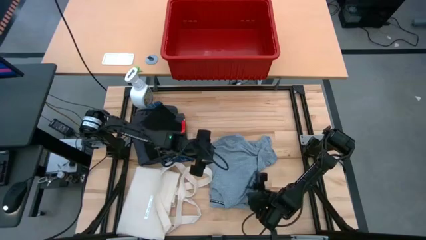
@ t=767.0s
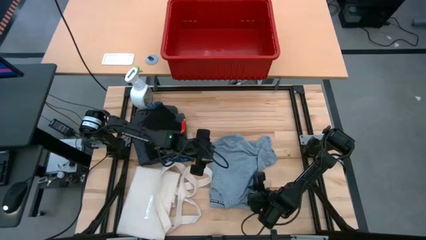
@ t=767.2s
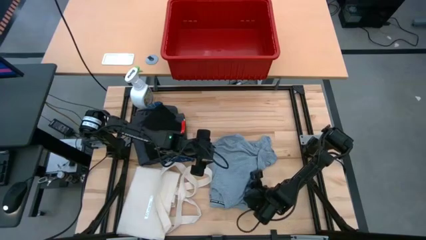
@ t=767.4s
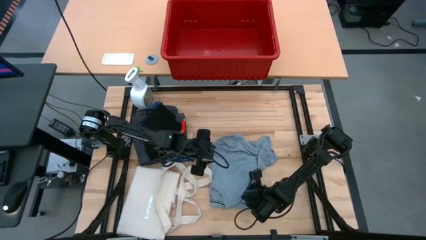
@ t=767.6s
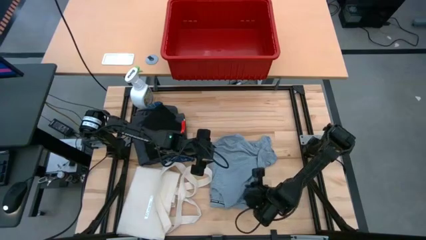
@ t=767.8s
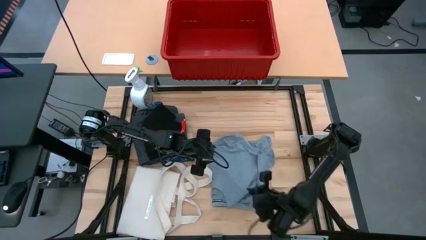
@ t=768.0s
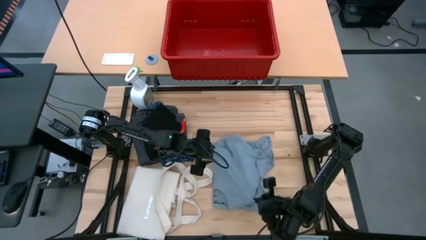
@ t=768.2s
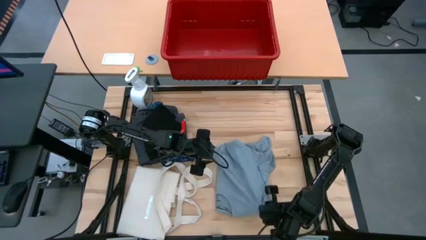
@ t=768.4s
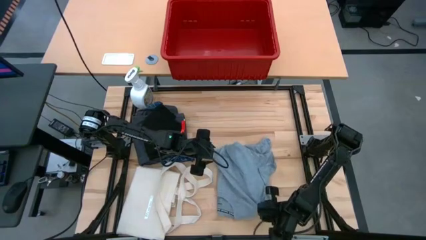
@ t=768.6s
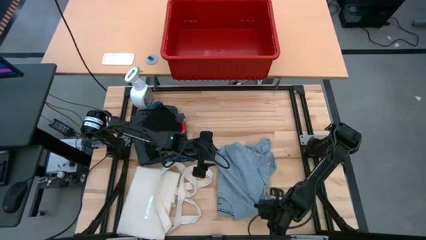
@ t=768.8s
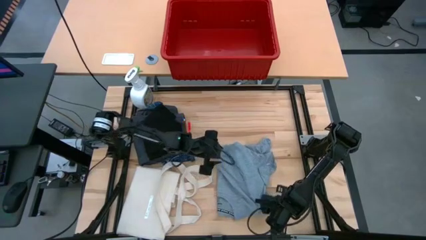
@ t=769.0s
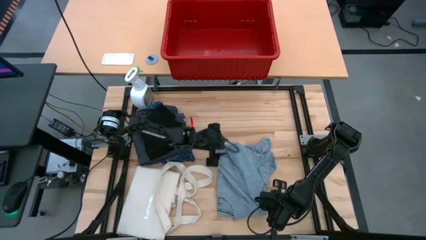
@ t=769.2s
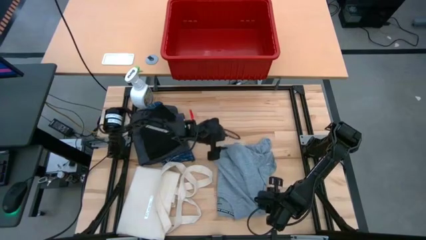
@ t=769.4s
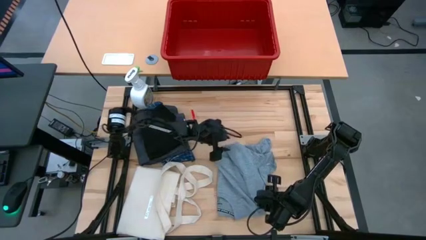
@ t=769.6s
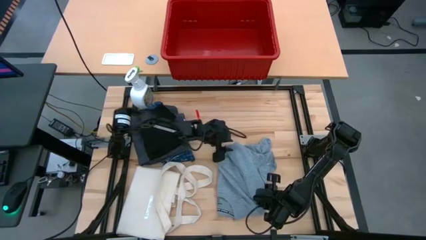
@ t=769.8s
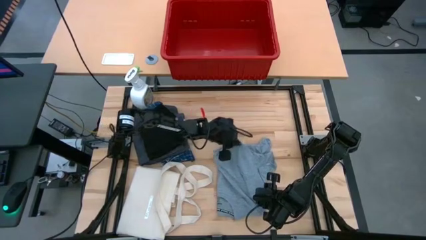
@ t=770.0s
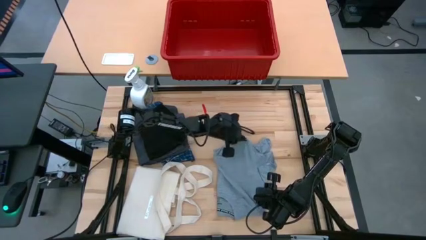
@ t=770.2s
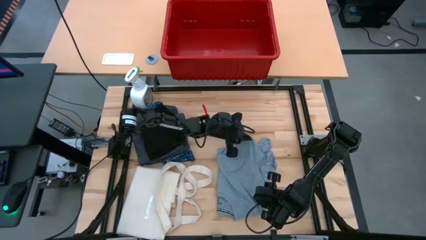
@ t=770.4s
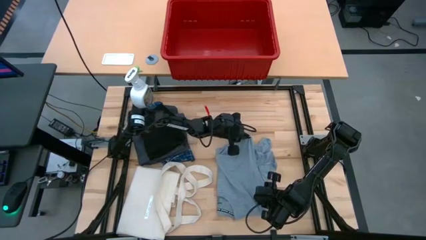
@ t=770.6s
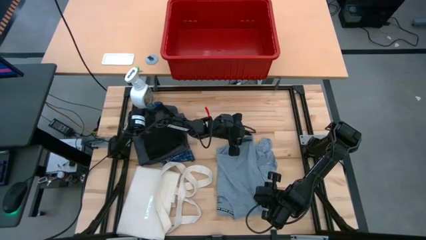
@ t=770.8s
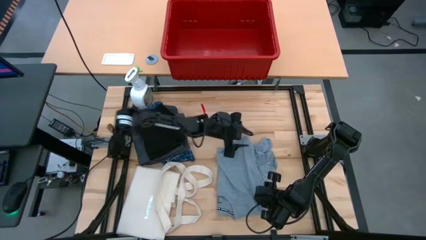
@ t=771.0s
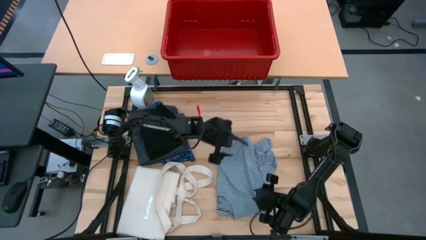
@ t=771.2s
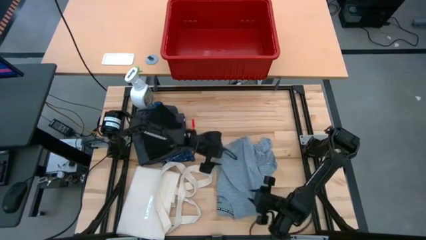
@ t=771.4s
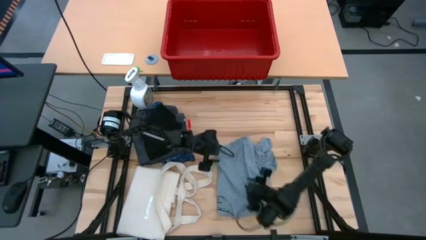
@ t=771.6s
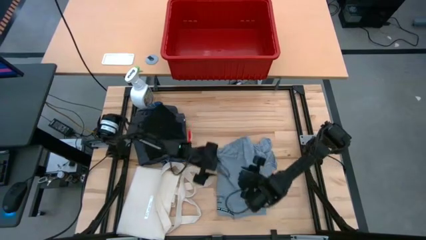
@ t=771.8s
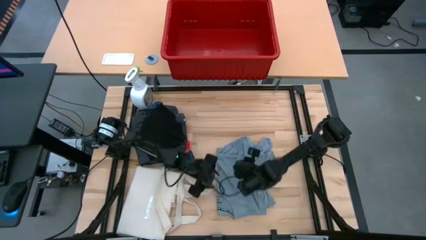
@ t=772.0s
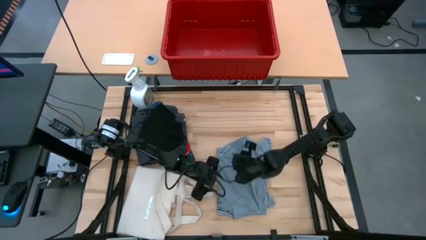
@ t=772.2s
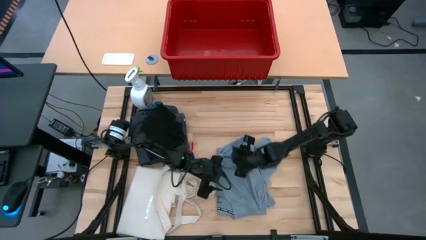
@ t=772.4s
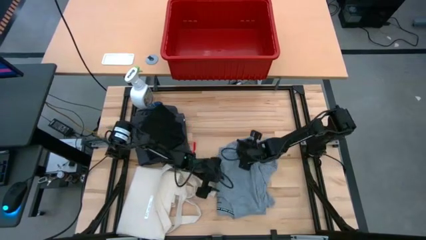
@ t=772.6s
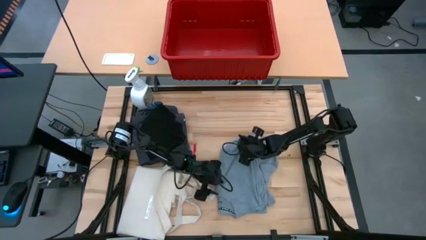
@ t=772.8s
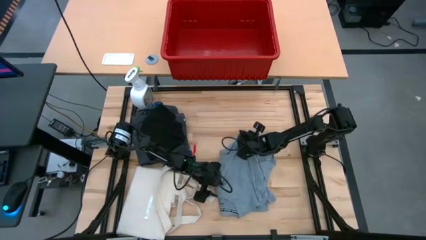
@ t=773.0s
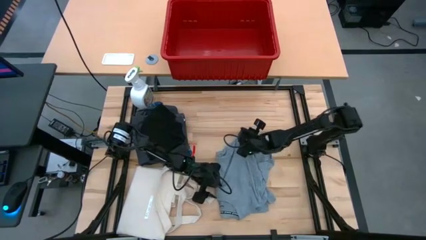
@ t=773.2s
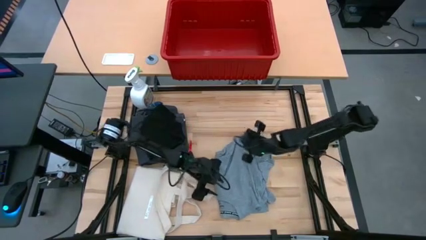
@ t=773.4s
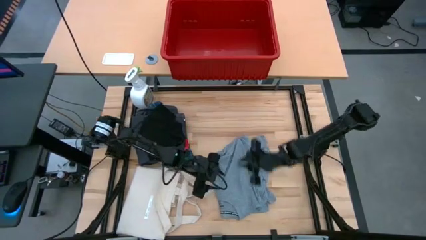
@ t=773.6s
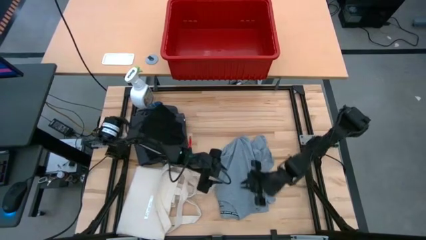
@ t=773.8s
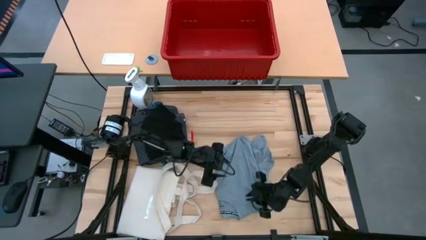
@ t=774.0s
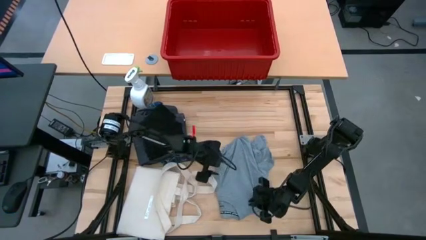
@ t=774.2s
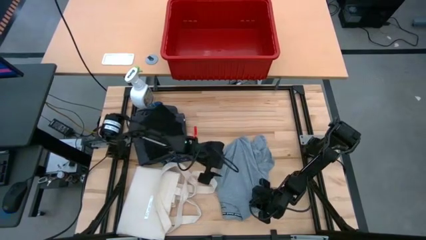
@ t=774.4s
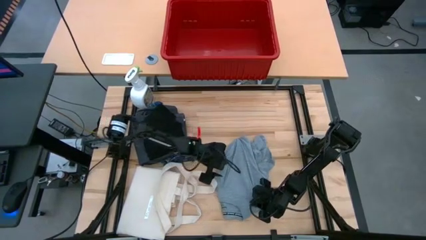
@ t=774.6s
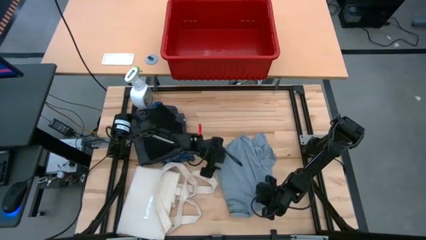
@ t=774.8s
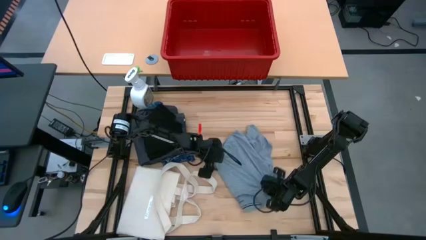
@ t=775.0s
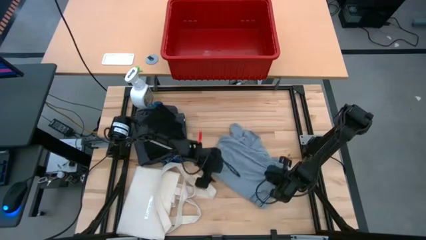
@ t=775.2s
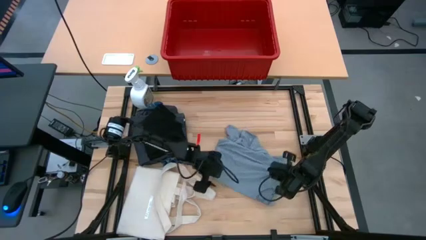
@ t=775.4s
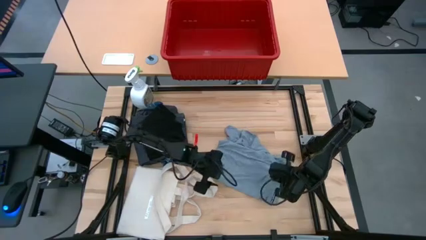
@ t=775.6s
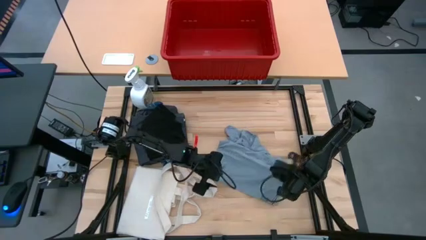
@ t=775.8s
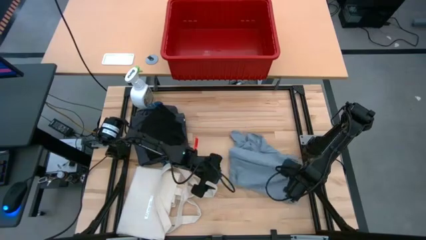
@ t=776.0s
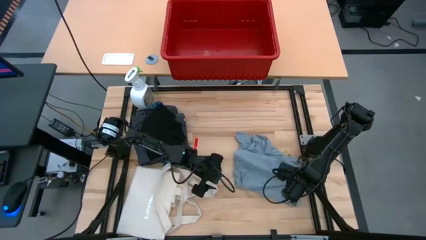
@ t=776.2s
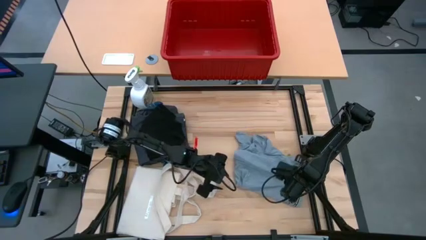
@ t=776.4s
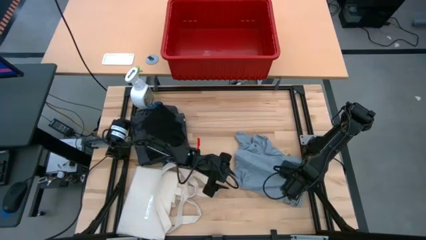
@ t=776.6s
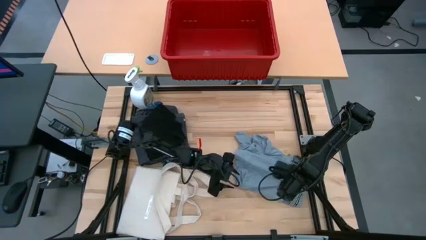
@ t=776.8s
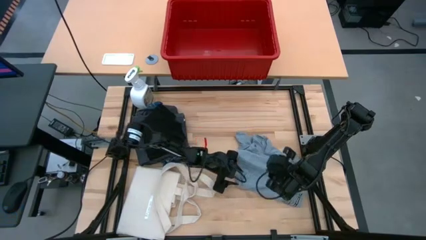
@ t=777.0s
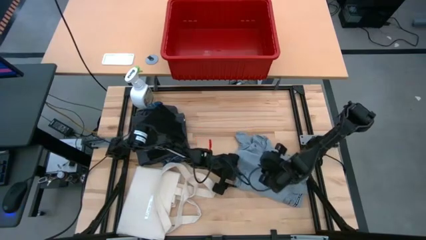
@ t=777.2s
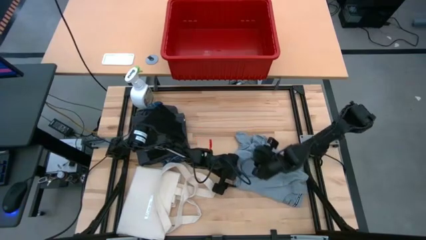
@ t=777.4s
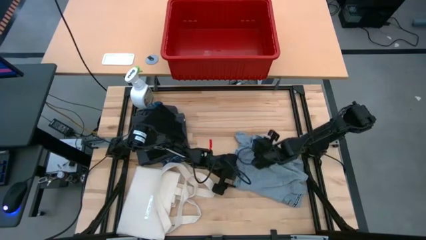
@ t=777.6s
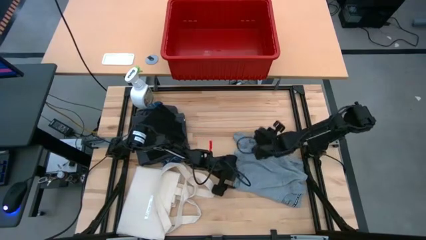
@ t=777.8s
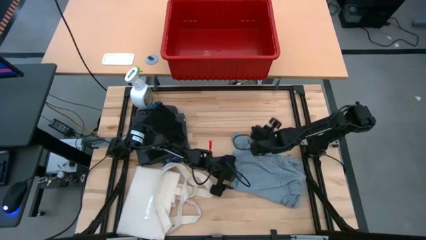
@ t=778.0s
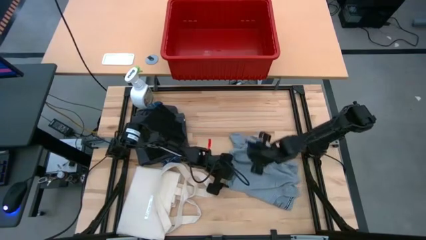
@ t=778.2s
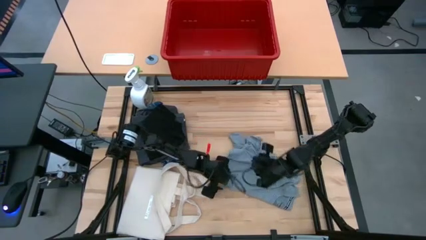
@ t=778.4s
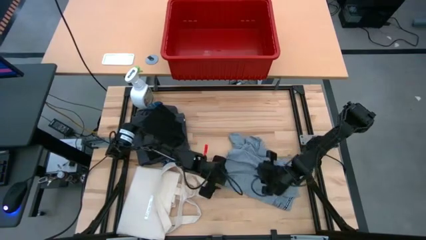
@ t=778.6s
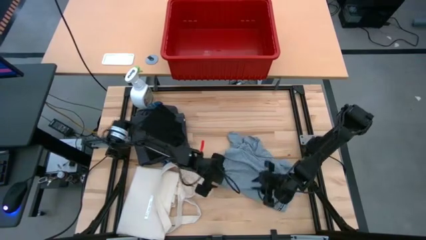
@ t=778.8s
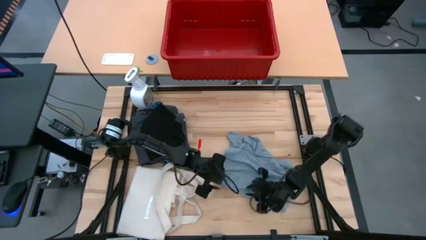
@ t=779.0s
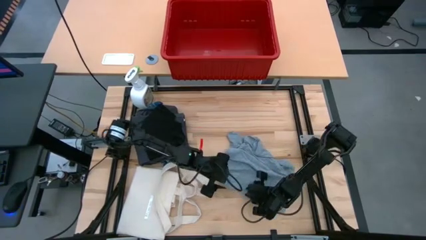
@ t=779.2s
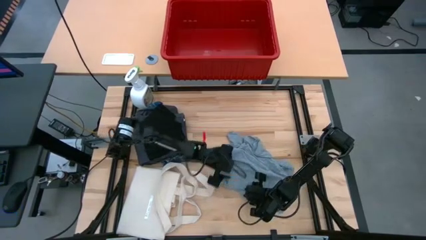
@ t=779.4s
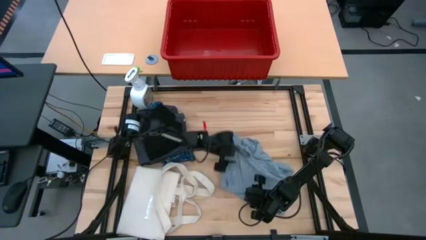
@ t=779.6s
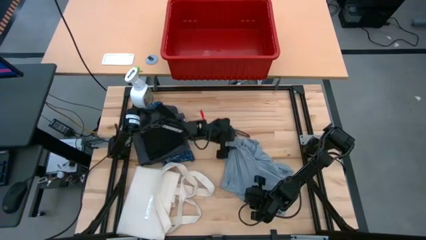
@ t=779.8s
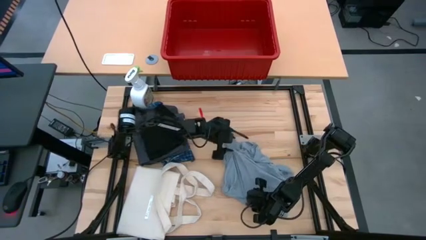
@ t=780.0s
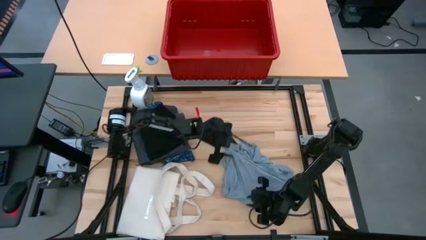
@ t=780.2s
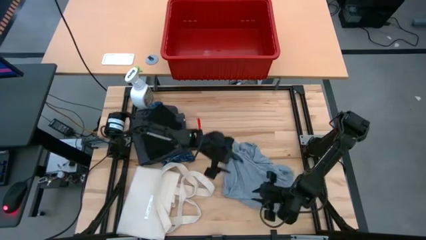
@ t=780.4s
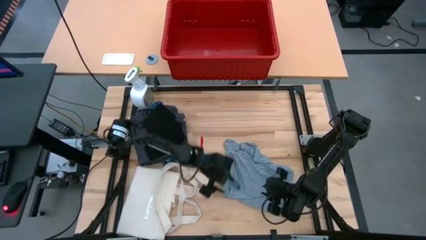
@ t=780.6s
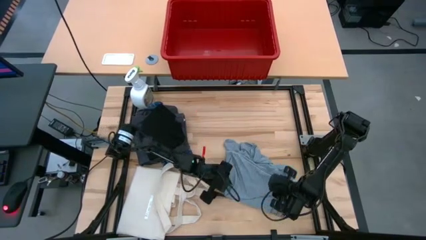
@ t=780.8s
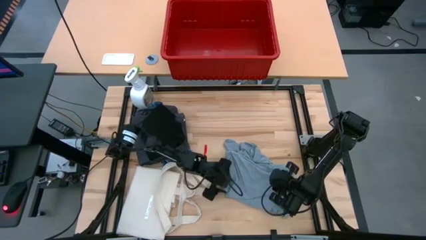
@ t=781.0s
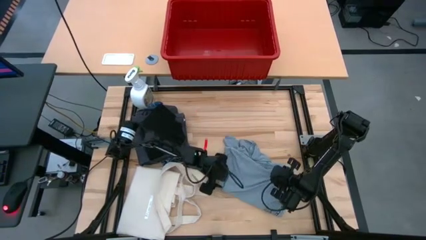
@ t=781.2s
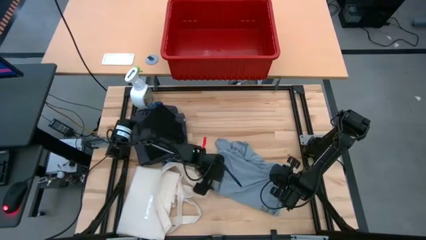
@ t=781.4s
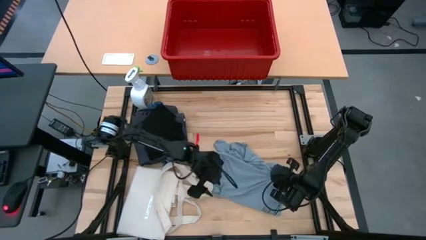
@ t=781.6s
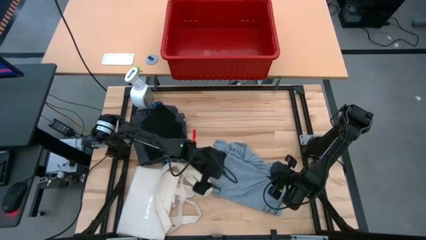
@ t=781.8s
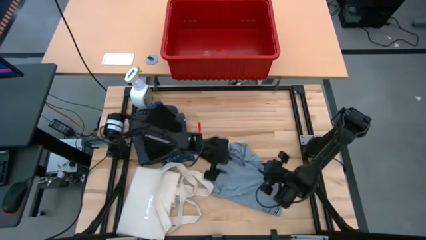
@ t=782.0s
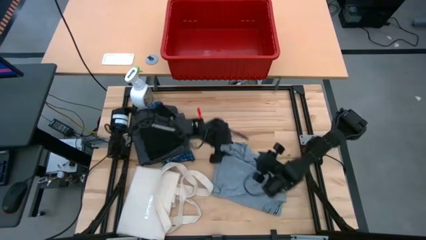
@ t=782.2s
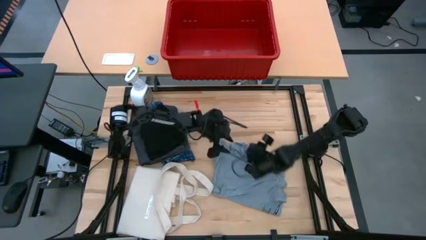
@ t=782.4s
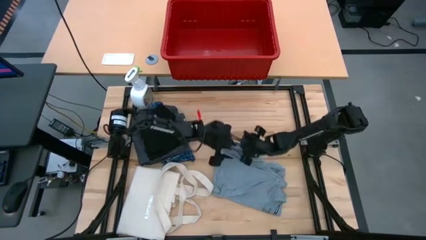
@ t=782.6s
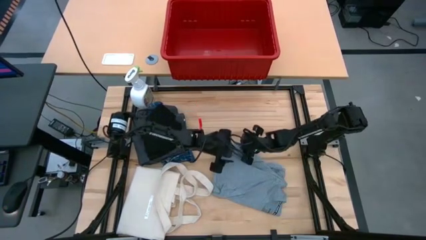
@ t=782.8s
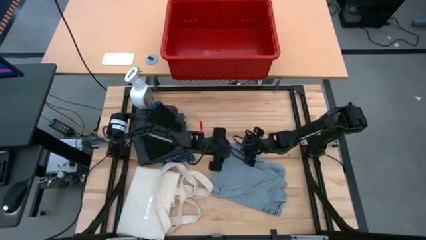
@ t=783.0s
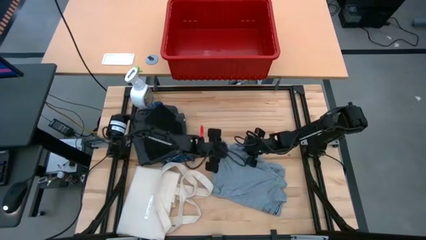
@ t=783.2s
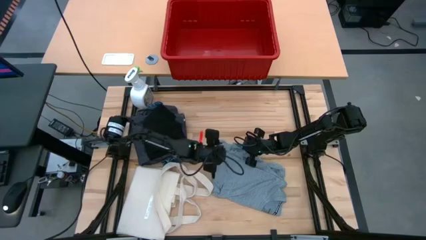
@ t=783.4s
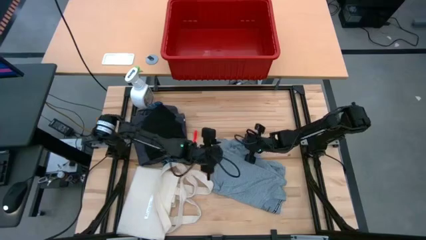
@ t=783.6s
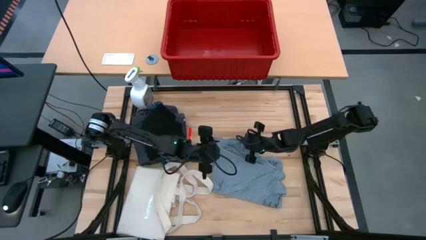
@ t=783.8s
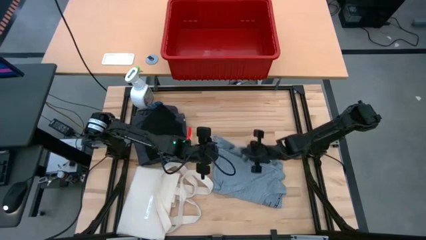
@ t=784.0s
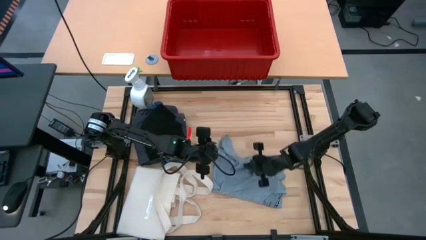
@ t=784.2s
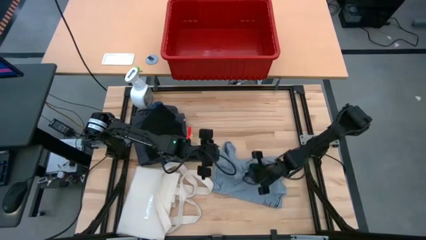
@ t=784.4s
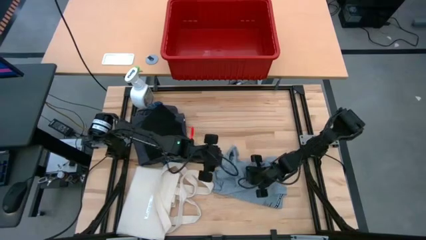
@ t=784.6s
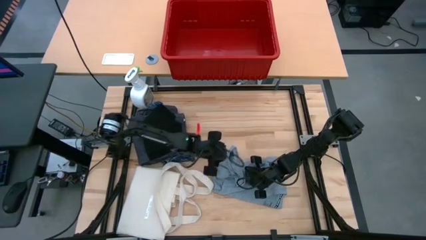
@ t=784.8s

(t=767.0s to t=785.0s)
Task: Fold Laundry from Bin
Fold the gray shirt
